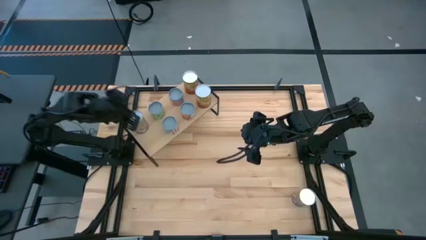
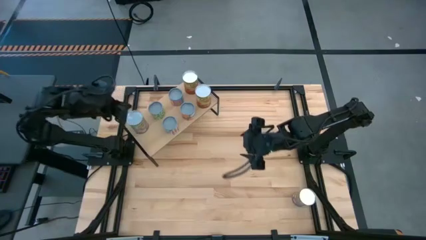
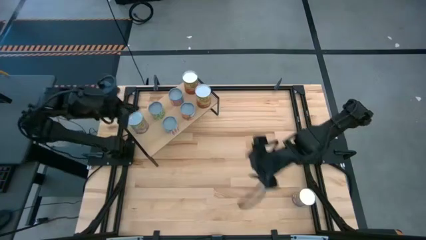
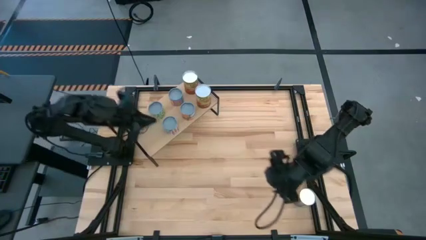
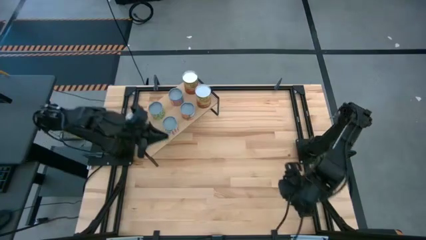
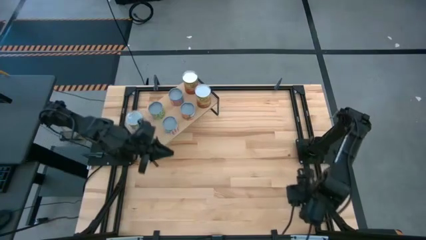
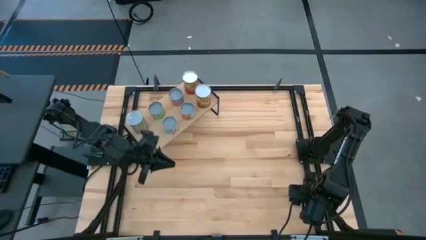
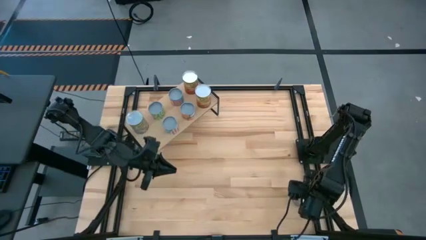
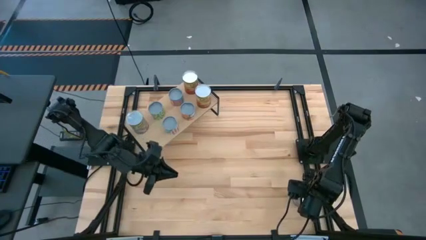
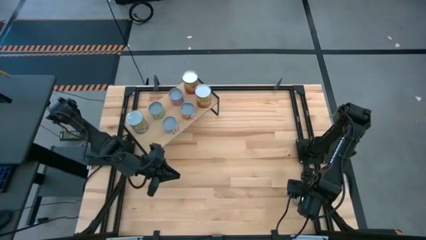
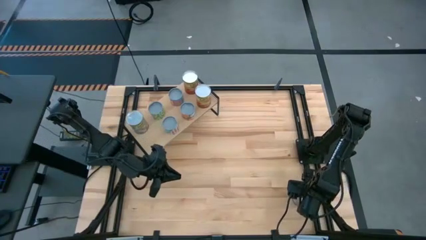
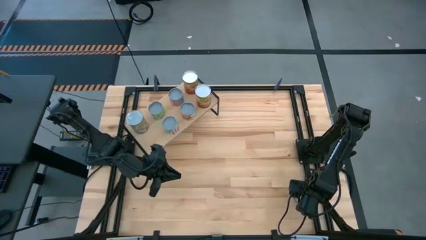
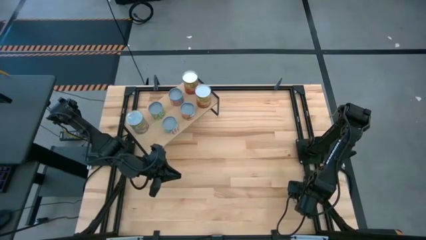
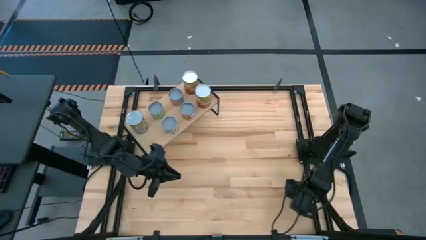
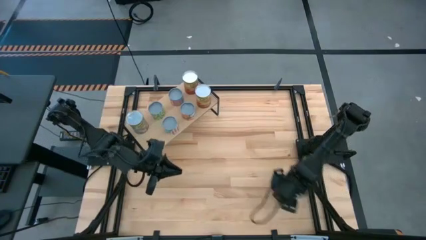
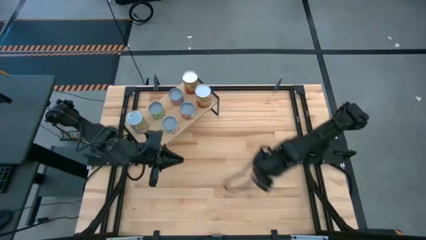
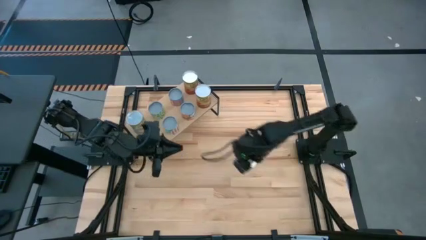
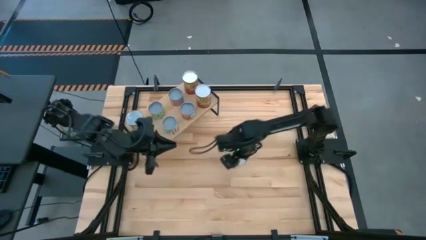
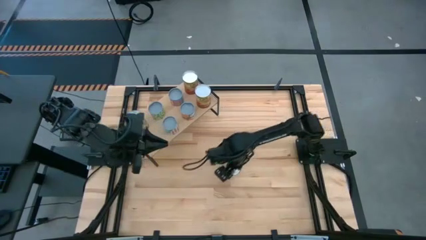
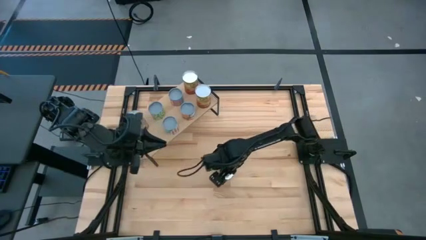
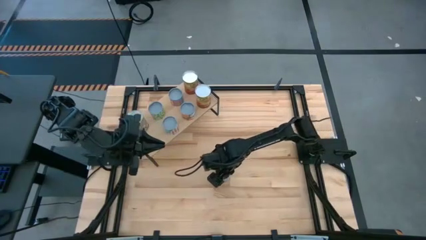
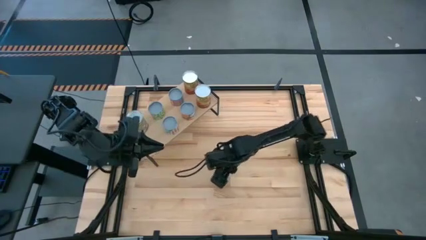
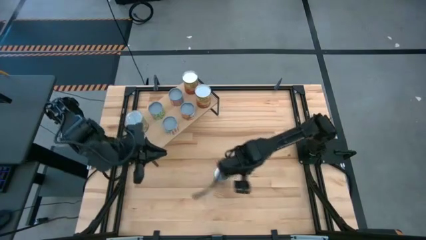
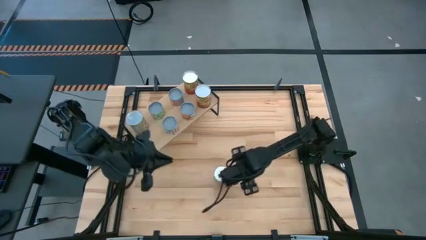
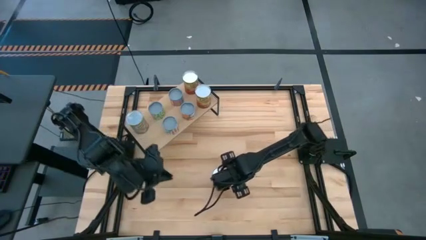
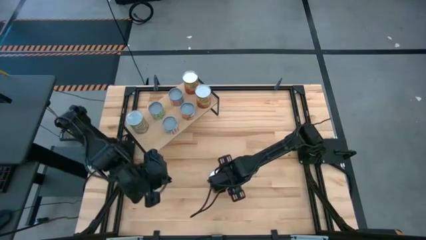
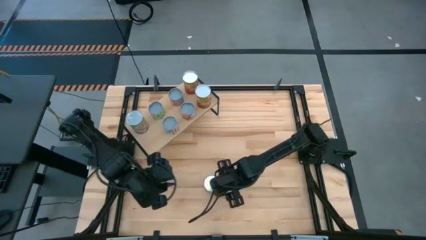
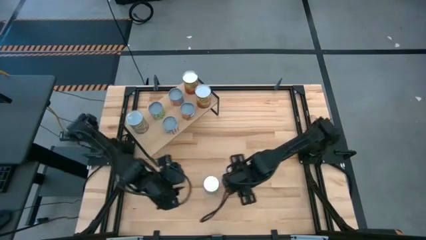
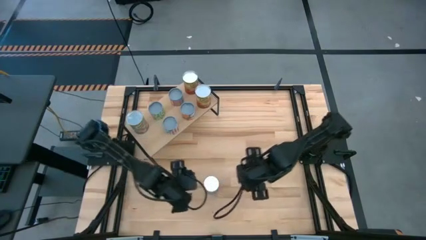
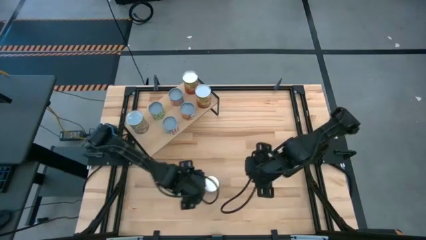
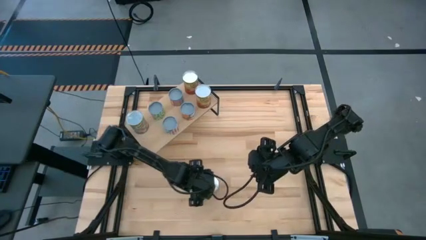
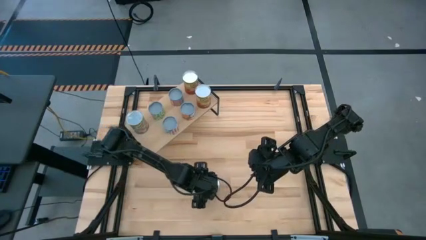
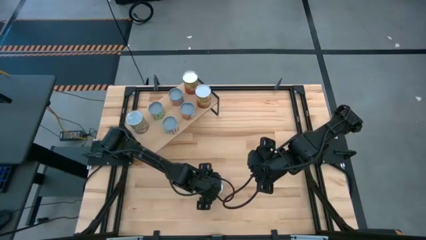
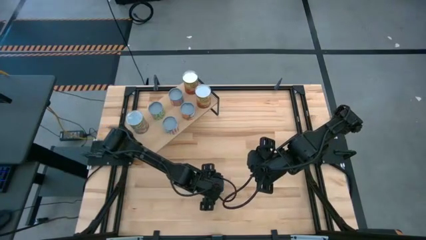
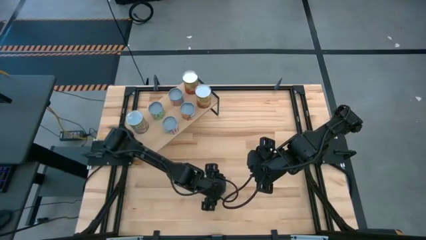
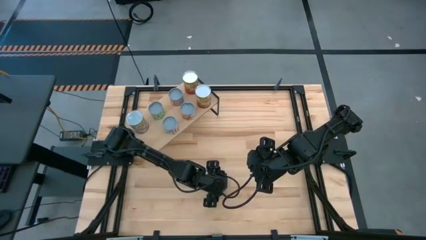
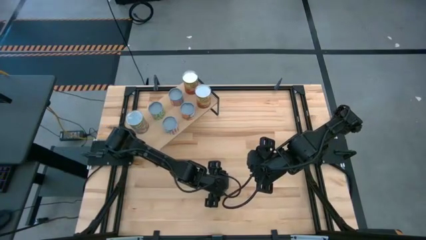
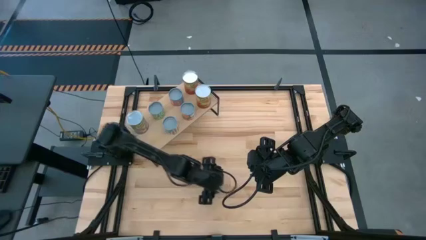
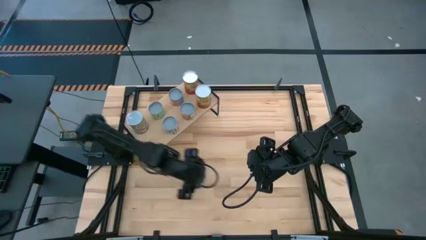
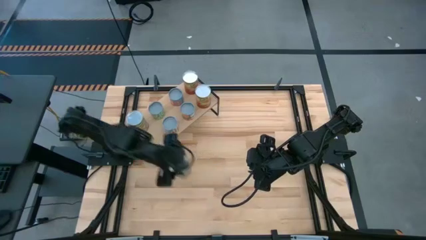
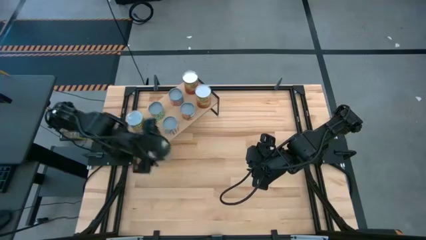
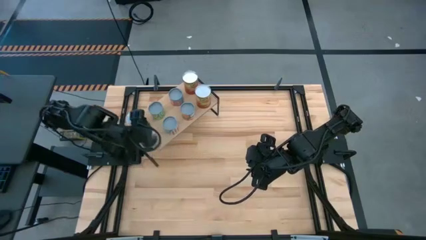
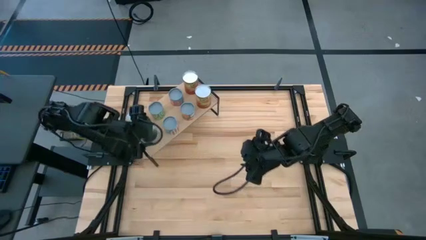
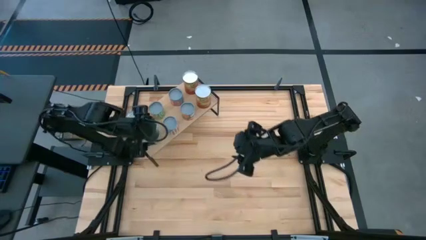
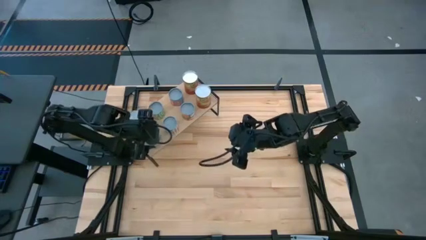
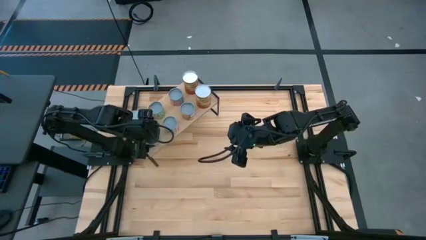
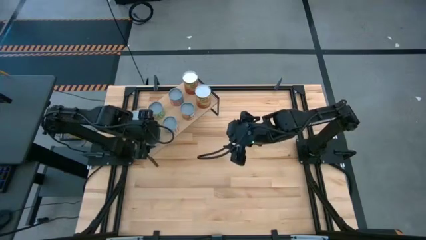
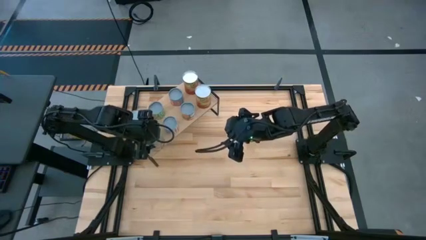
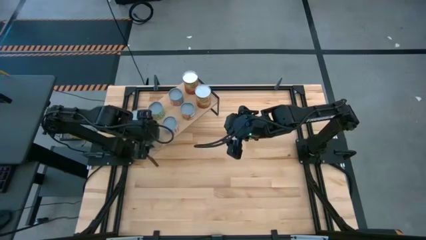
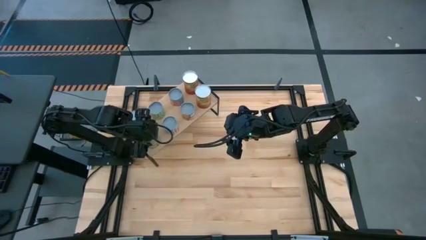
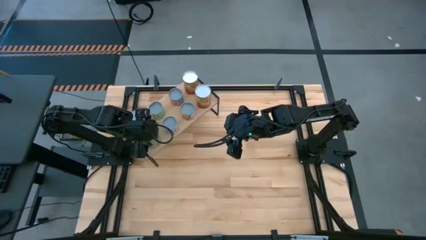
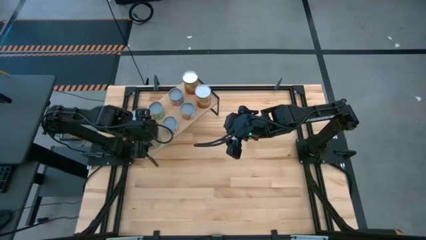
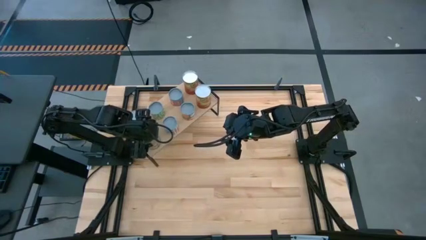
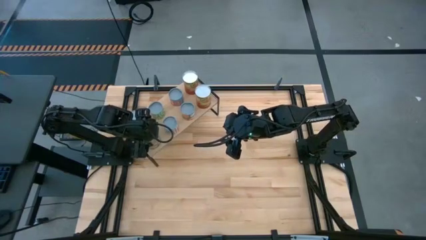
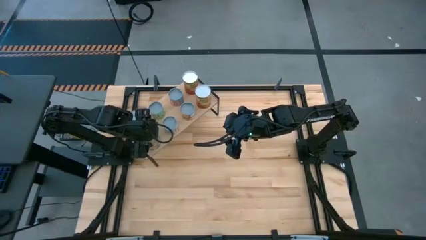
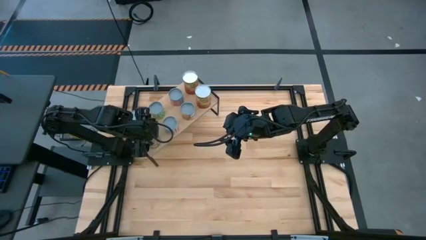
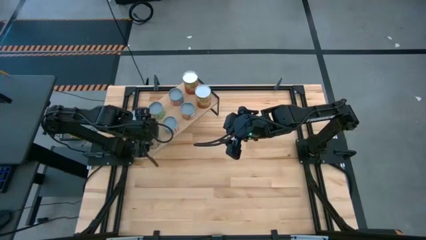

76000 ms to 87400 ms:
Task: Pick and place cans onto a shelf
Put the canned peaches on the shelf
